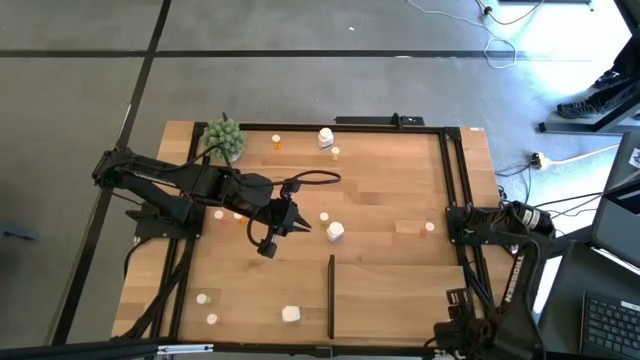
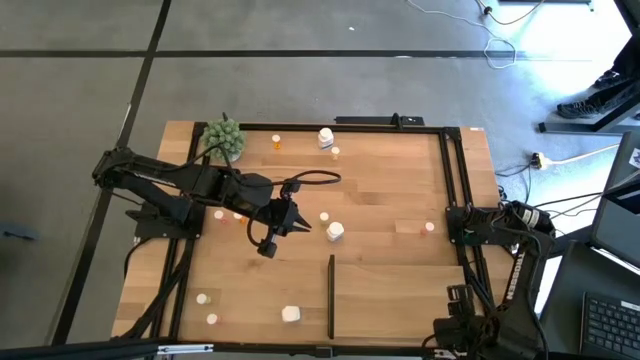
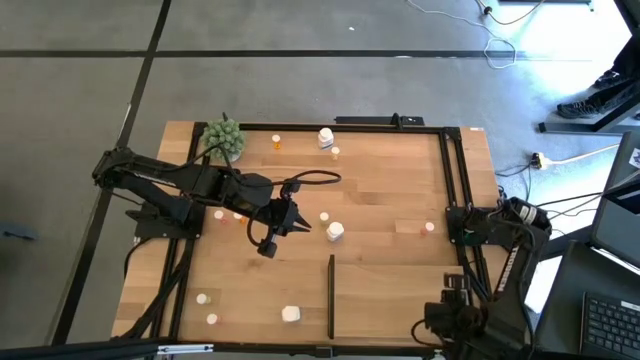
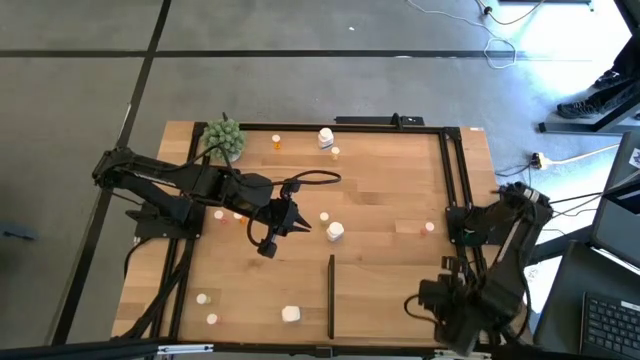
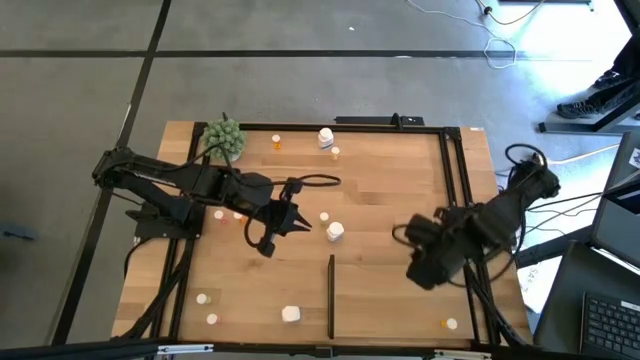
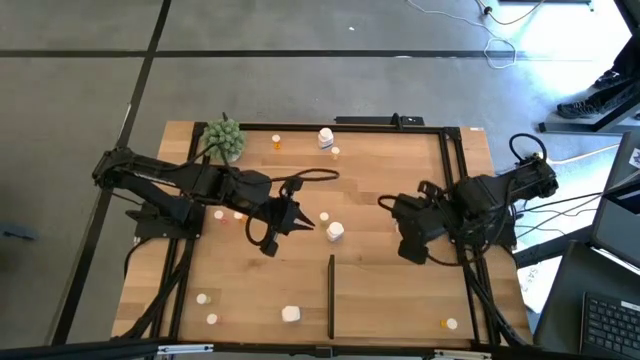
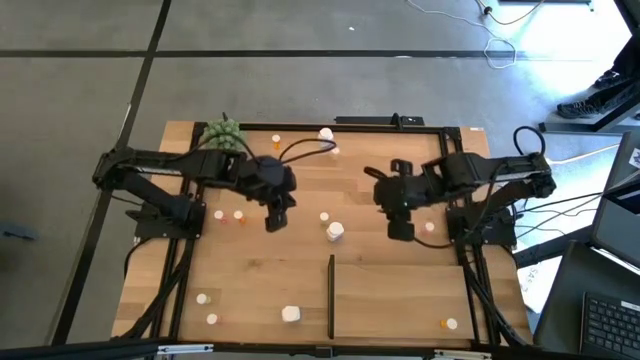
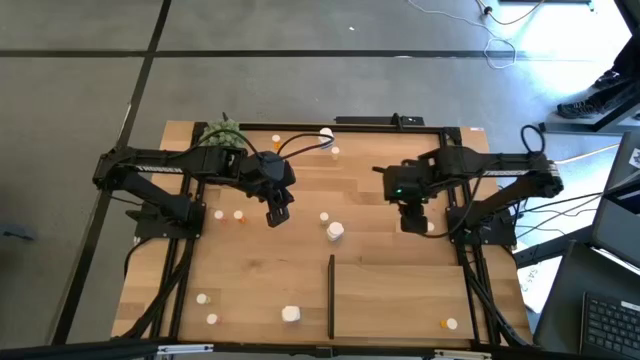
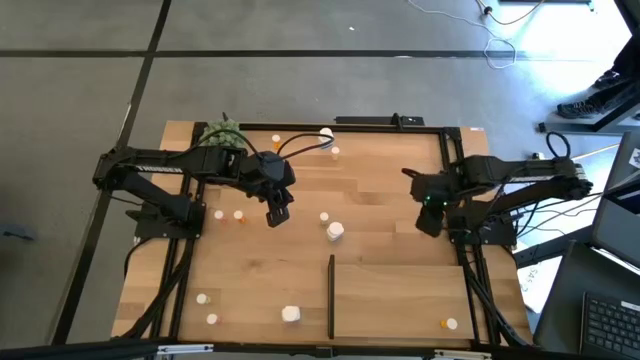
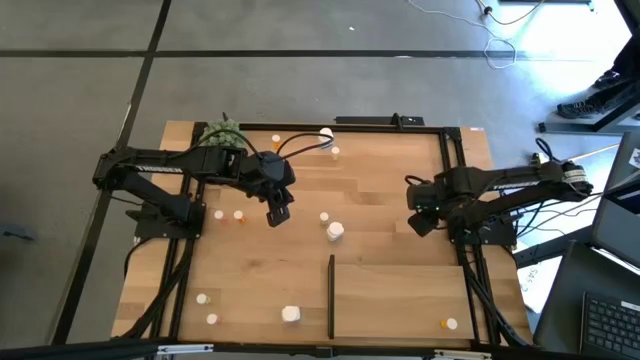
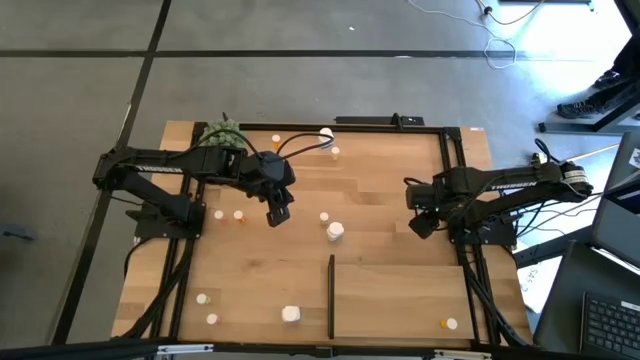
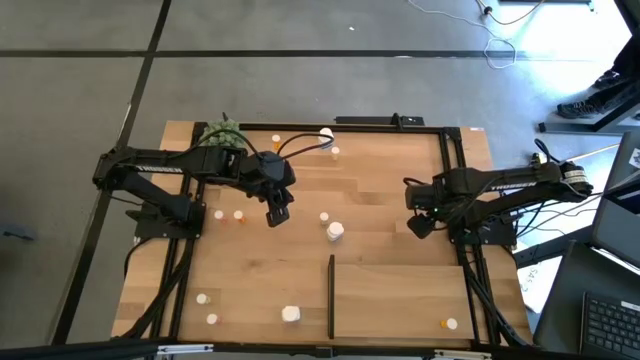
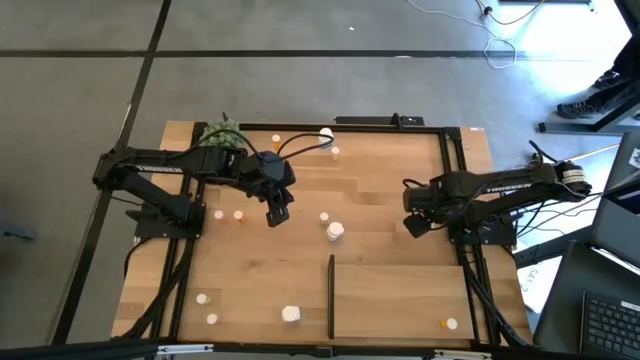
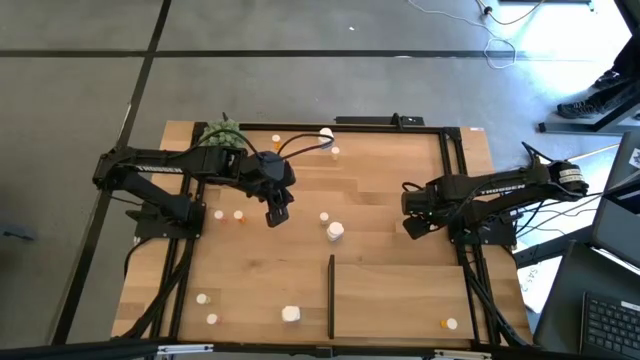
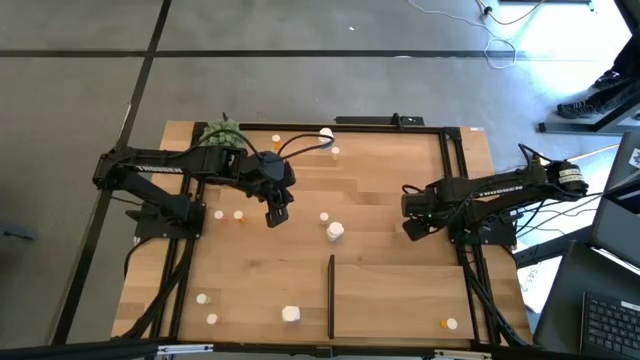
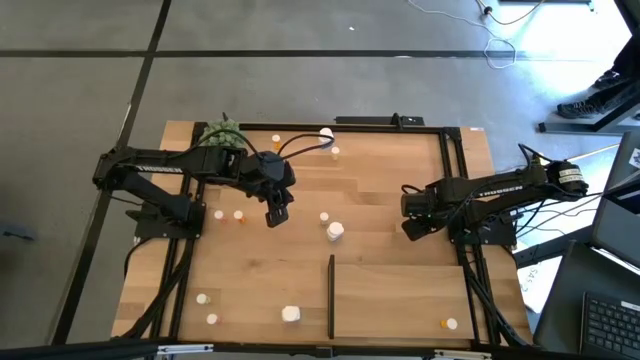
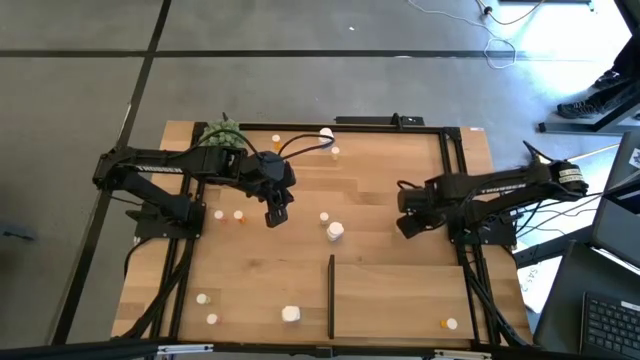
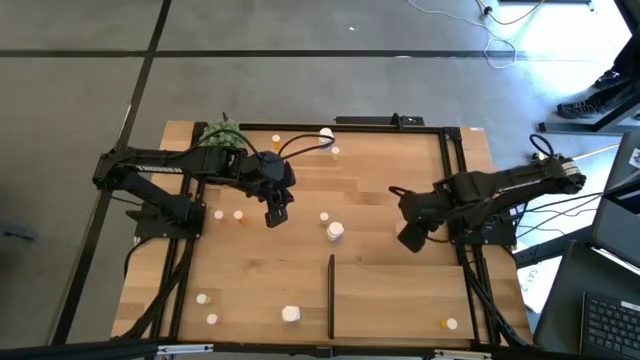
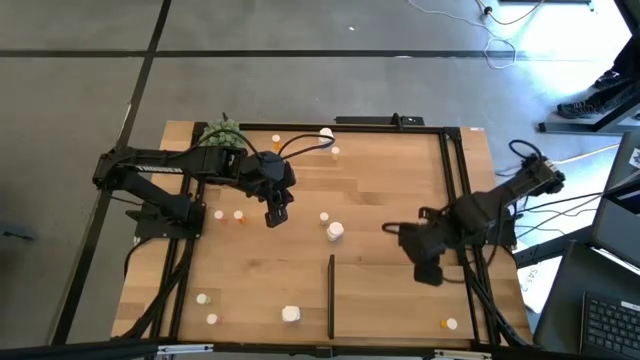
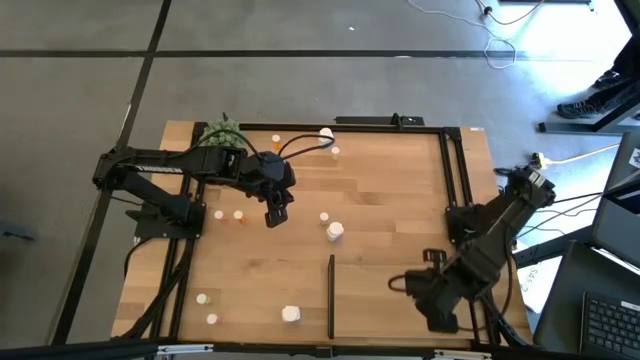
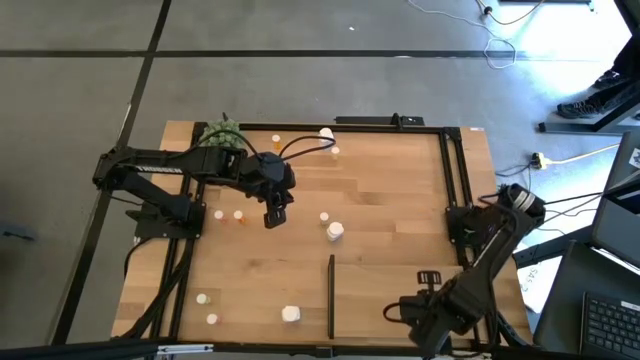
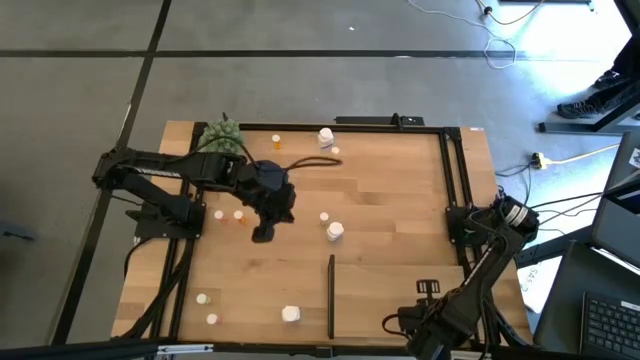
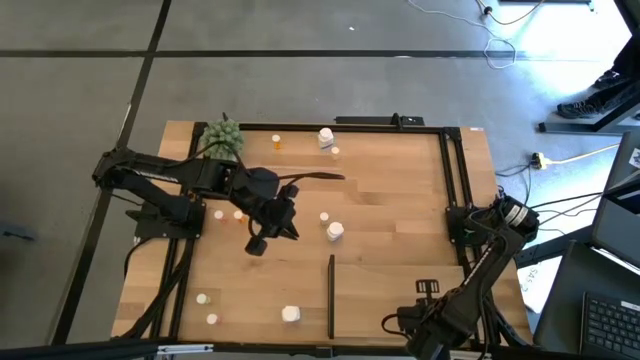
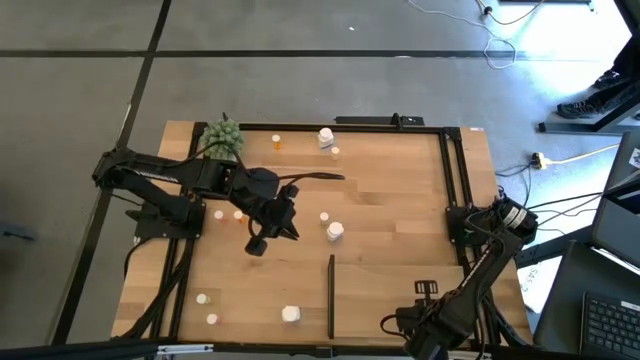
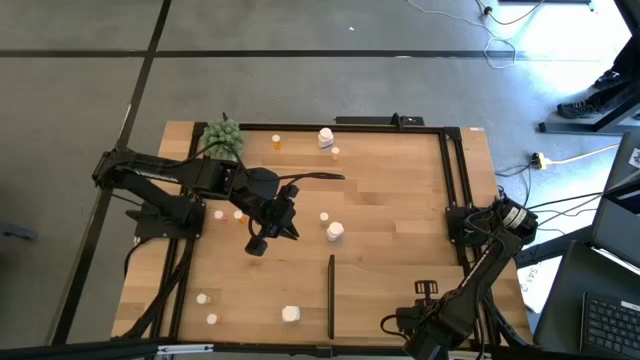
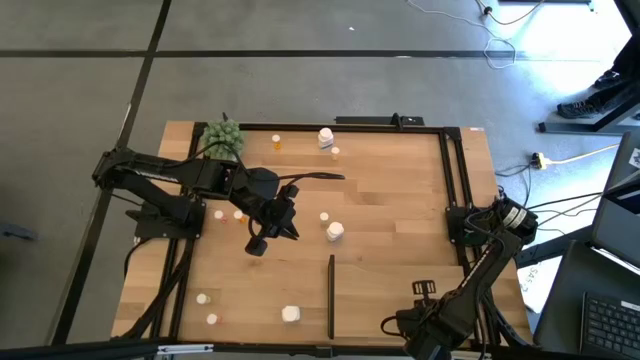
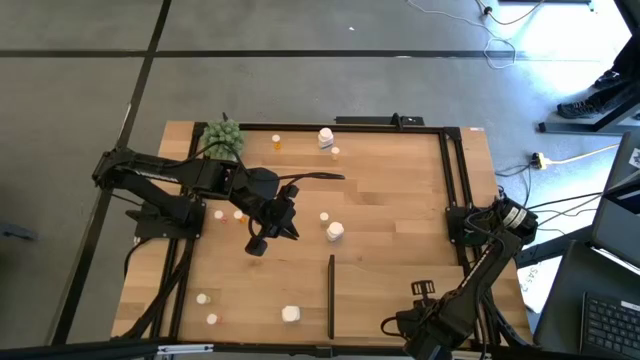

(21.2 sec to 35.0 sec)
Task: Pick and place medicine bottles onto shelf by color
Put the top right pink pill bottle on the shelf

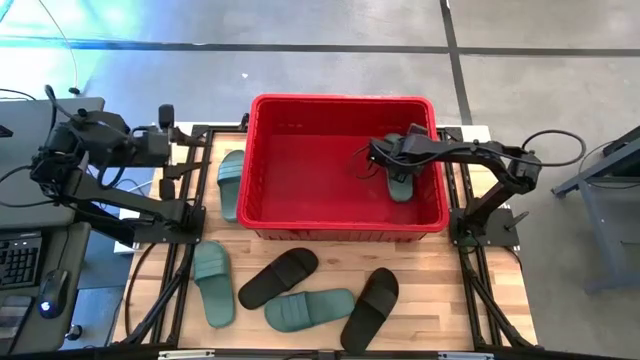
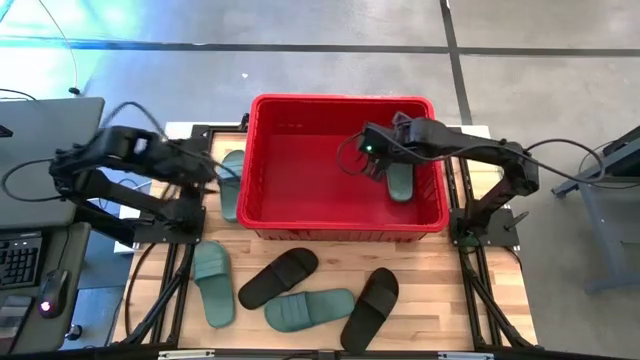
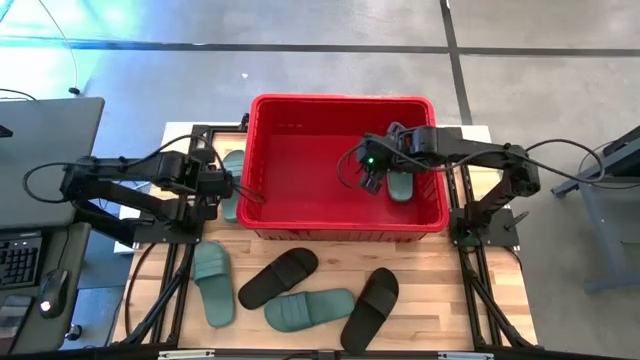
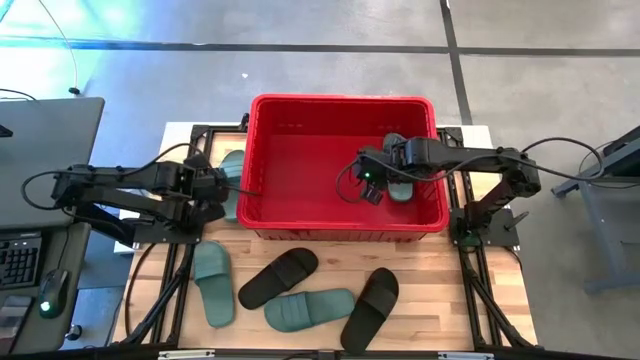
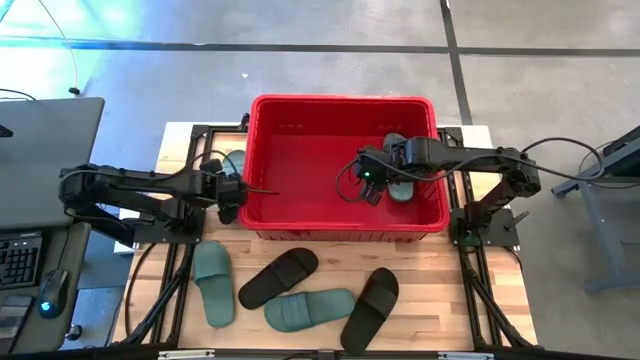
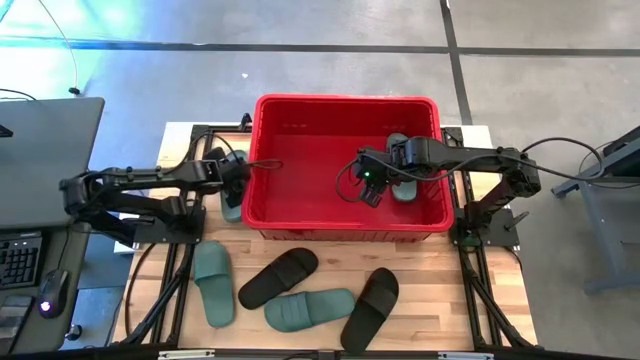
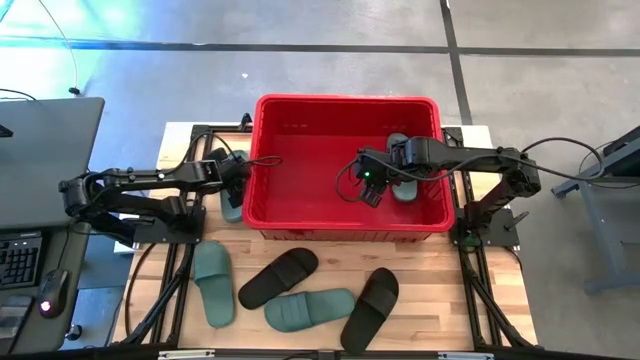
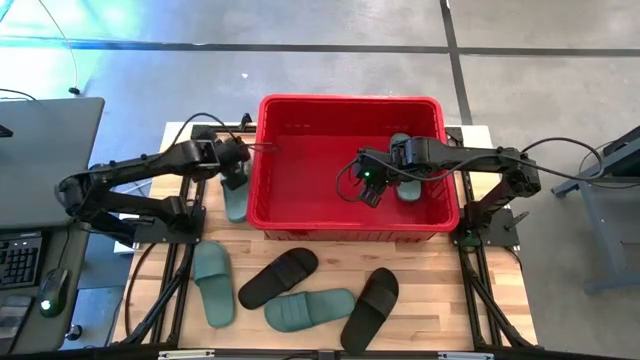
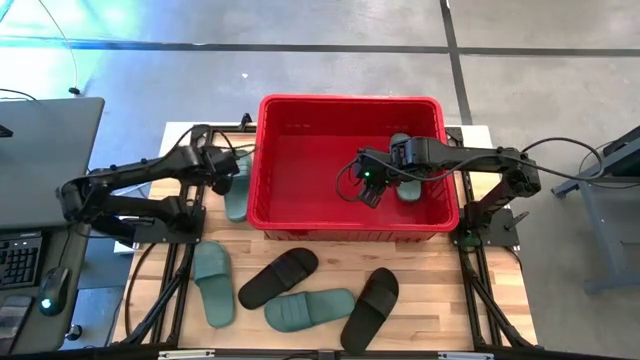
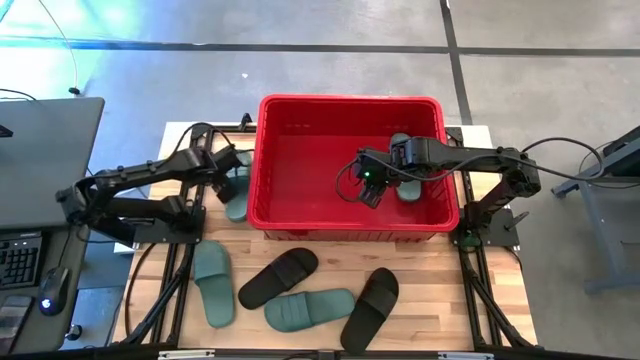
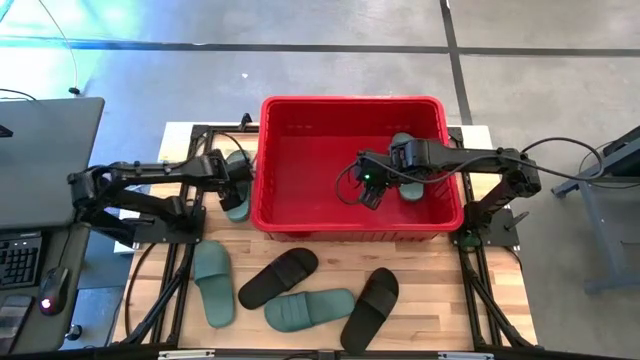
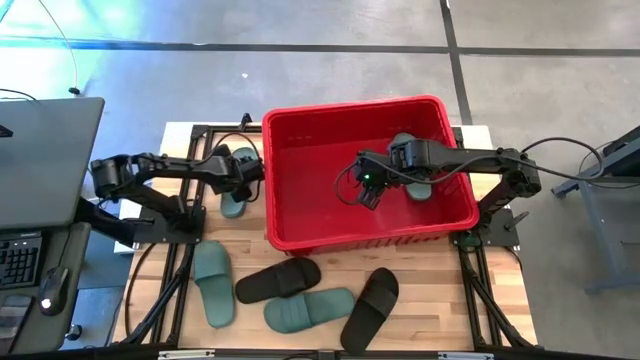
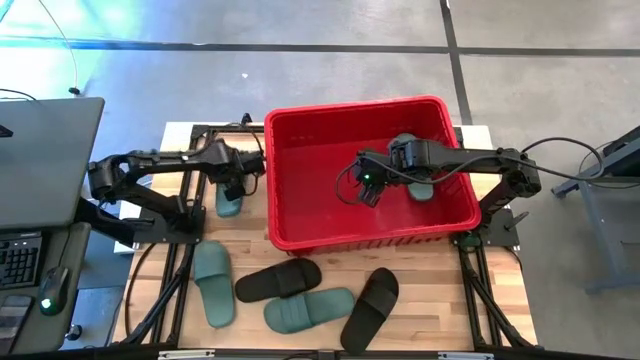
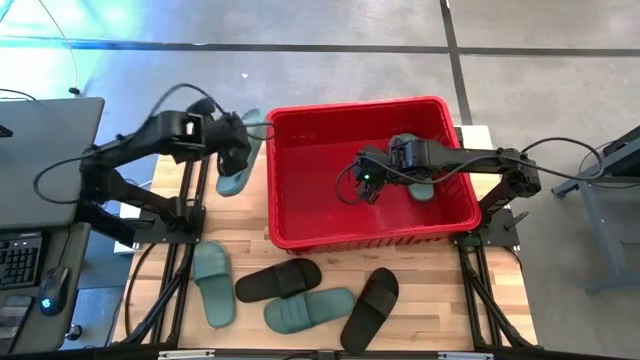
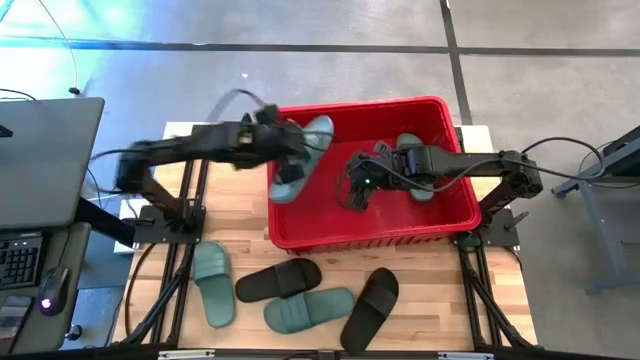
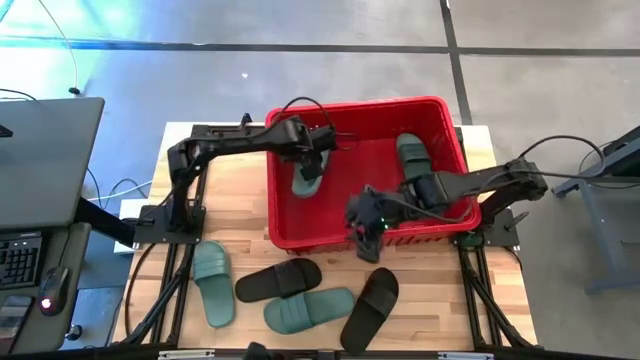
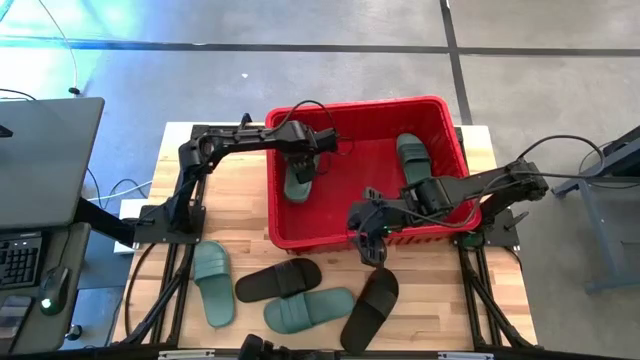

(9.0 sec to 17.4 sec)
Task: Pick and place slides into bin
Put the green slide in the red bin
